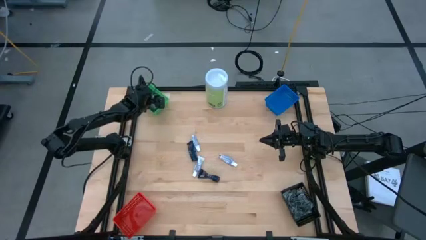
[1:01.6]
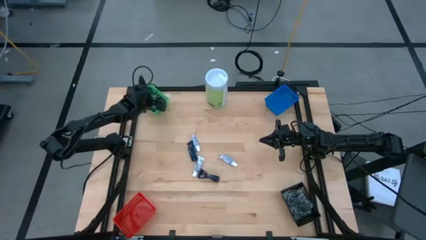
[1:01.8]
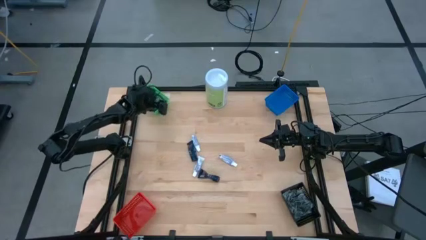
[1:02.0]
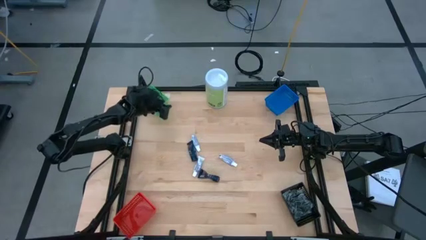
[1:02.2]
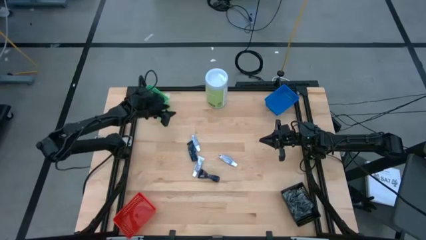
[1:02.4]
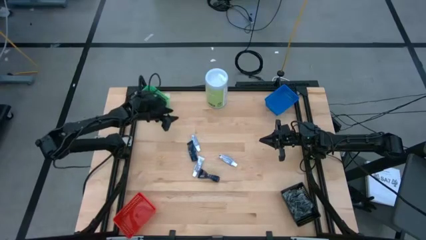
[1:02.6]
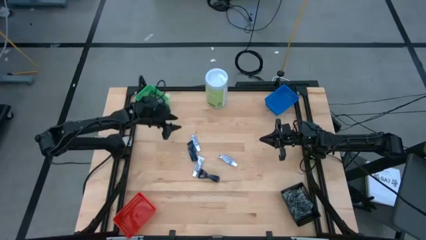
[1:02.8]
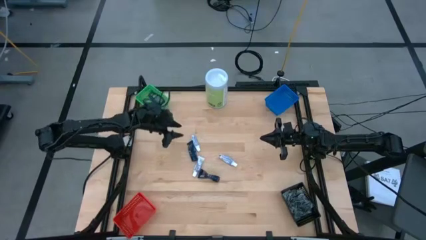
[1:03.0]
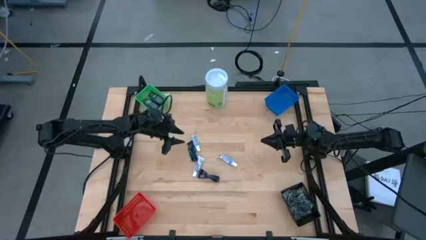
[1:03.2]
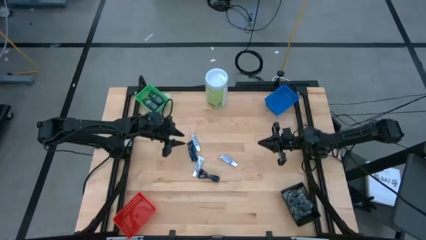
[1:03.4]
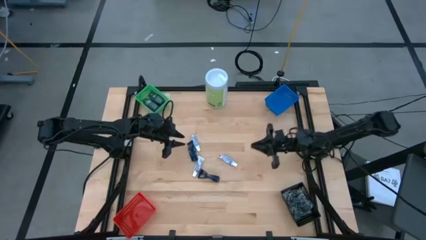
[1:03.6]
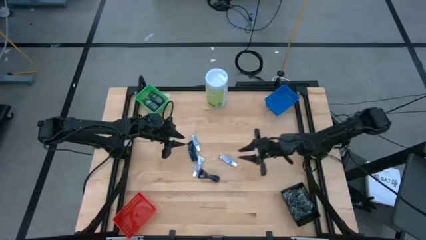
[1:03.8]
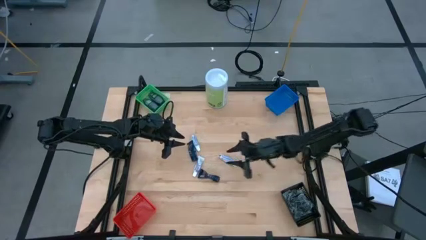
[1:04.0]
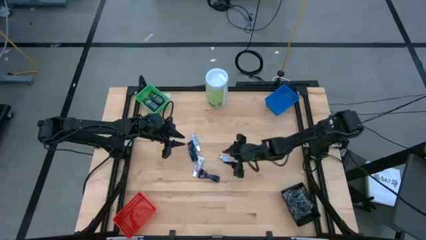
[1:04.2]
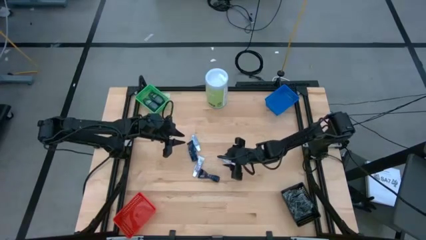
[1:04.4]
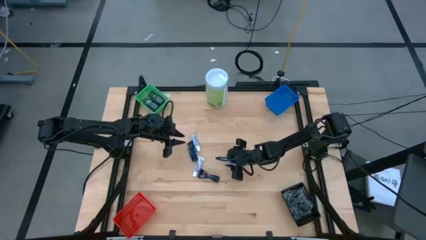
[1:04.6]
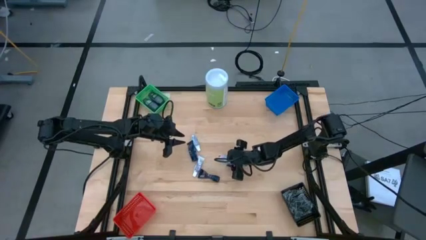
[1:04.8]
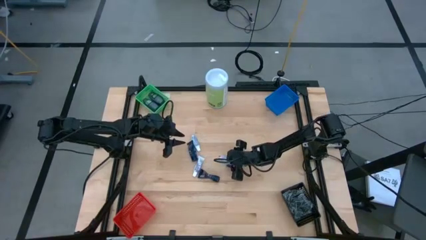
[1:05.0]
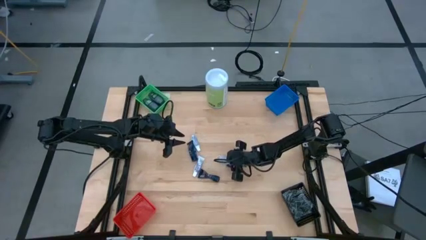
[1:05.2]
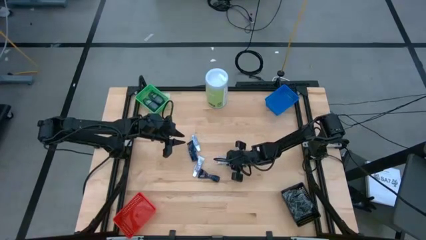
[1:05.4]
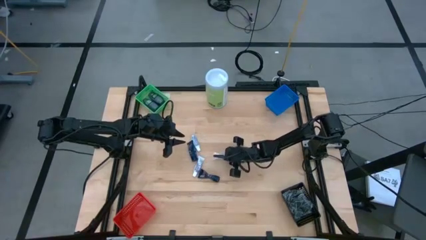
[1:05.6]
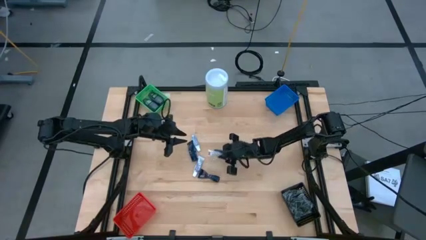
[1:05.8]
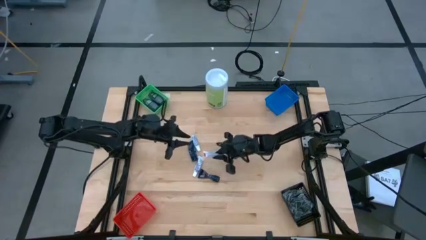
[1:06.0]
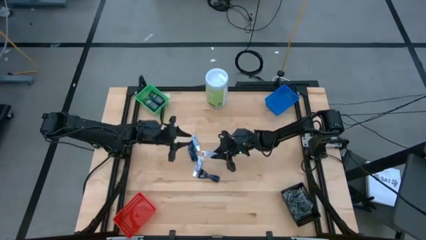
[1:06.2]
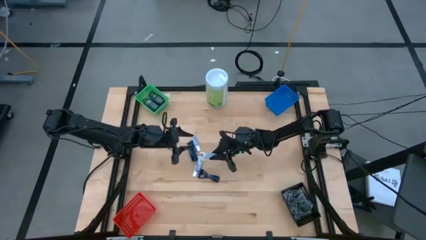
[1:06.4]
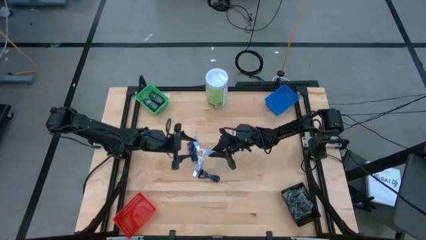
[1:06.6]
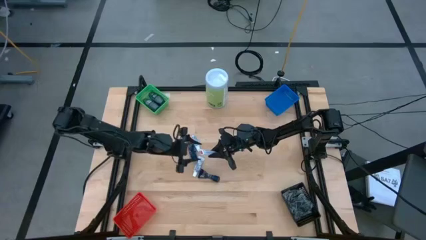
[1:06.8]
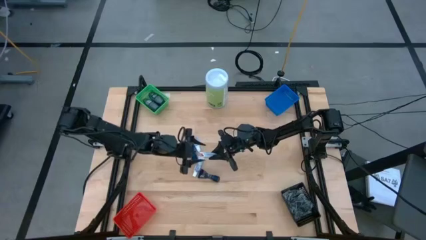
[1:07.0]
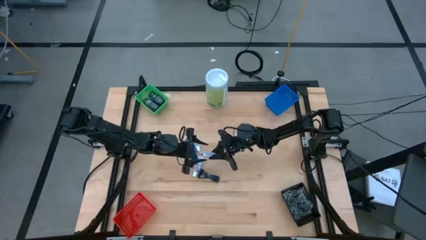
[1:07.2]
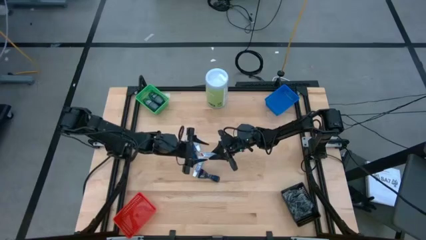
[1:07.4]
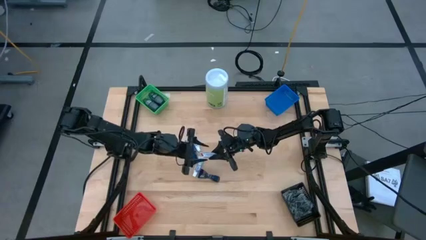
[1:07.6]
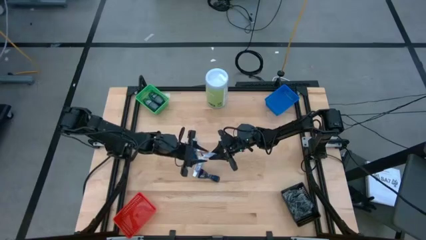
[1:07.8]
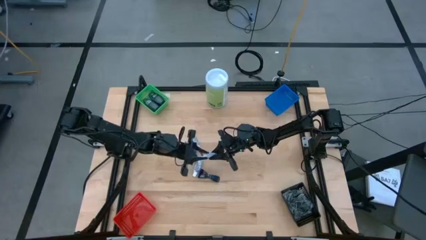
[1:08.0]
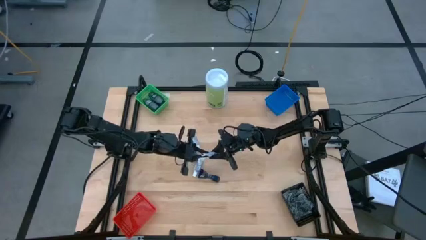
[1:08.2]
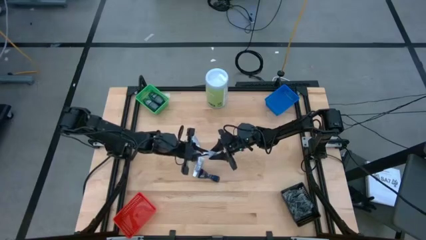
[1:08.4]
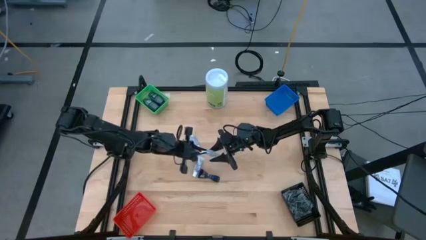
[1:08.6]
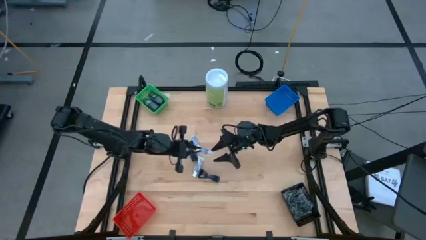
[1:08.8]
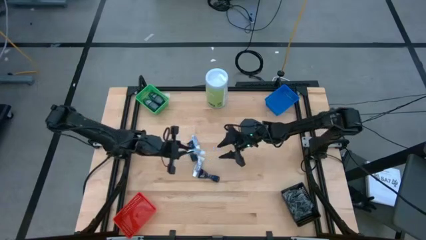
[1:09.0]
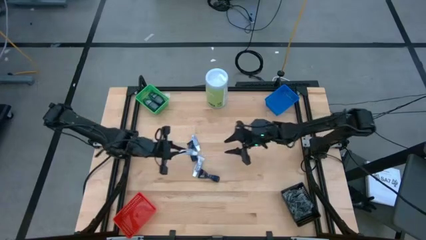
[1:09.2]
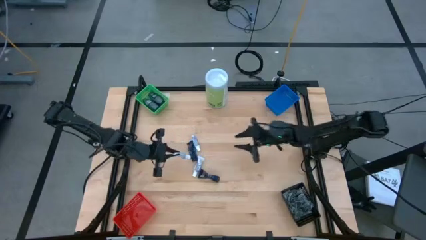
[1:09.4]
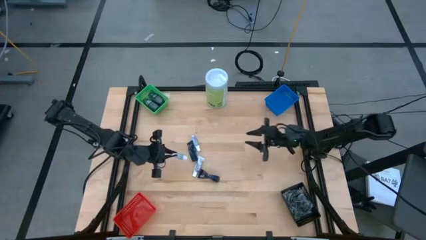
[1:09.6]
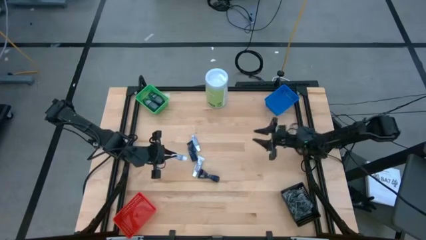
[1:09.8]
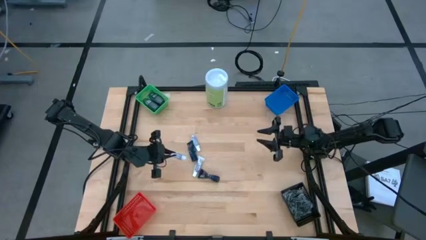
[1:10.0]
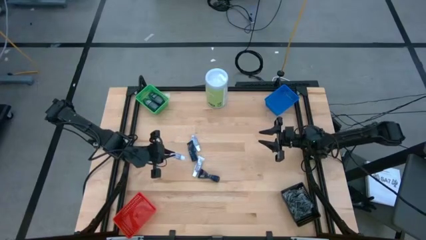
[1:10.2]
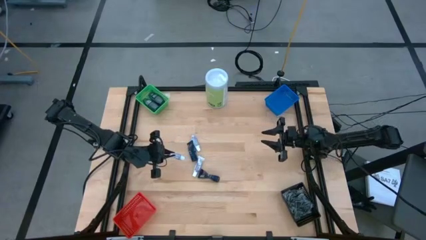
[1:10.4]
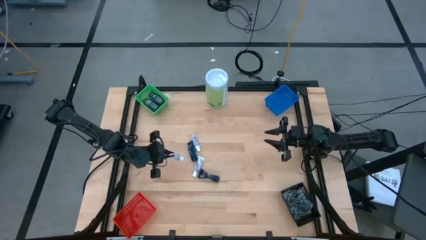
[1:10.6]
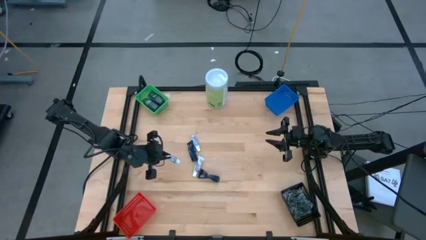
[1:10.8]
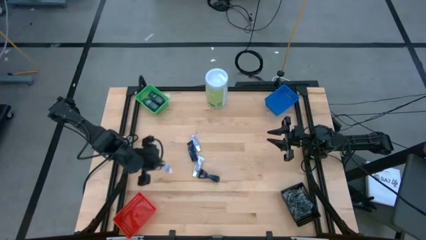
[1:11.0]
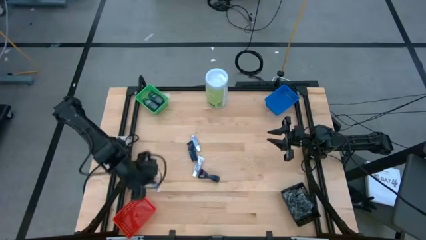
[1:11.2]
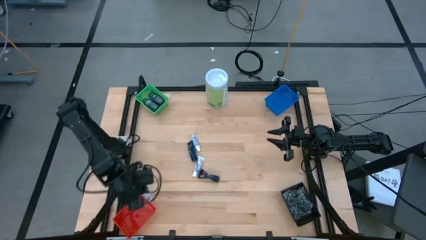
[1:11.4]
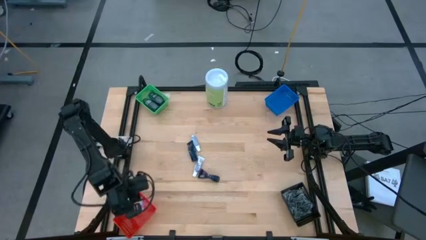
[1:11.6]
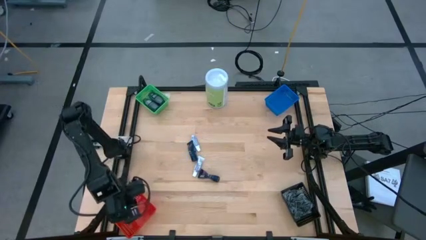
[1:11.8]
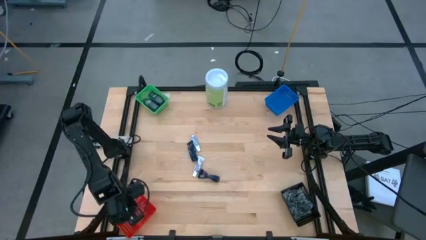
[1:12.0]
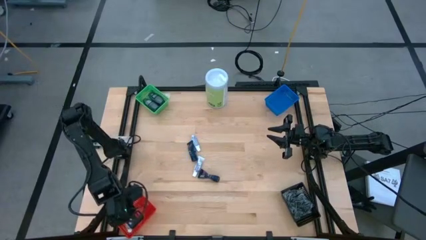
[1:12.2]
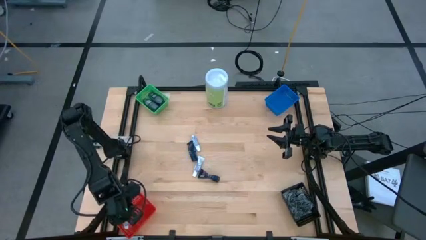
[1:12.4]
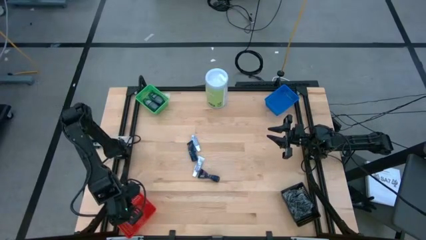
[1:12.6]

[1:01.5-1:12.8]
Task: Pick & Place Travel size toiletries
Put the right white toothpaste into the red bin

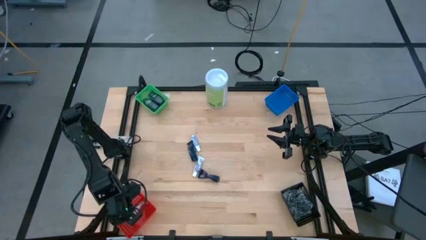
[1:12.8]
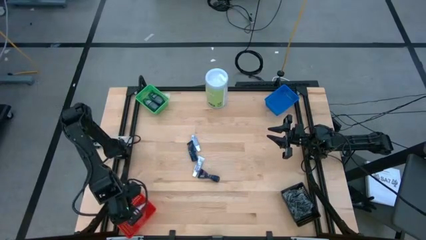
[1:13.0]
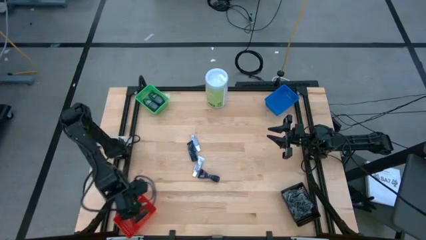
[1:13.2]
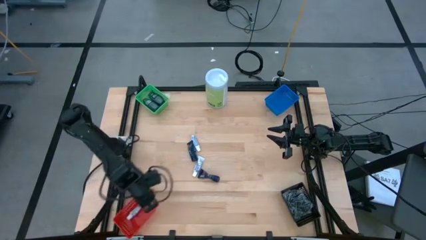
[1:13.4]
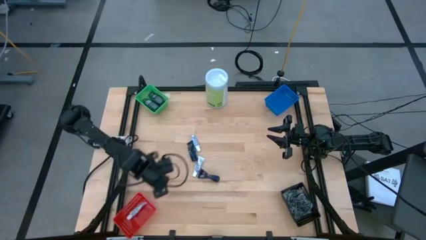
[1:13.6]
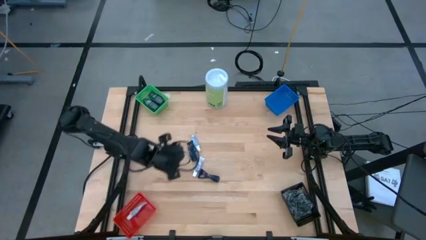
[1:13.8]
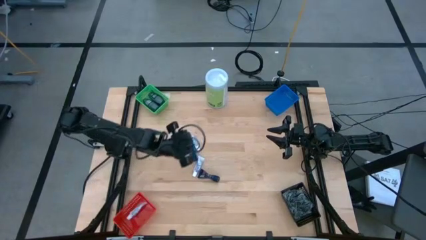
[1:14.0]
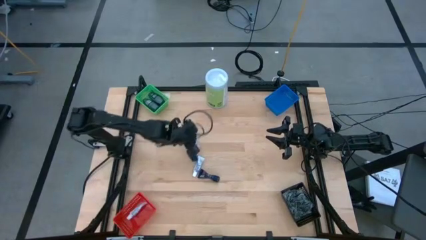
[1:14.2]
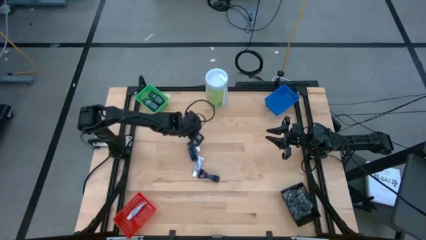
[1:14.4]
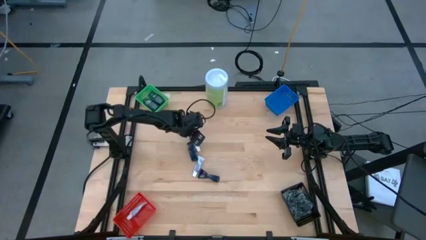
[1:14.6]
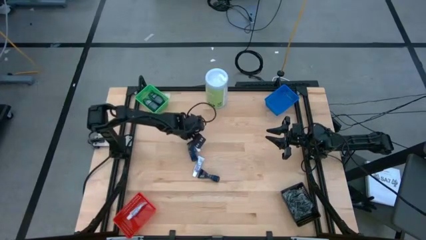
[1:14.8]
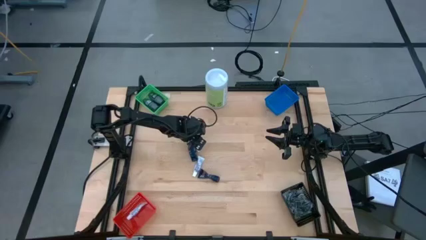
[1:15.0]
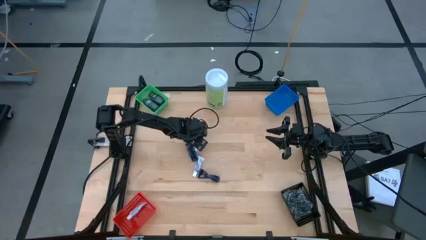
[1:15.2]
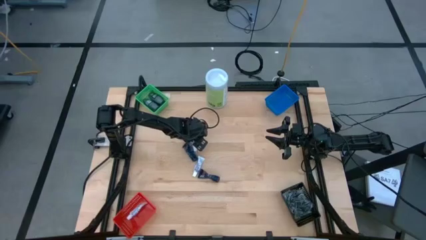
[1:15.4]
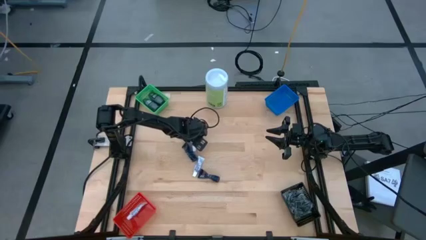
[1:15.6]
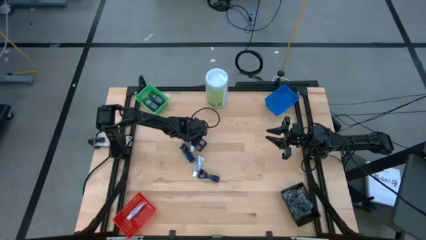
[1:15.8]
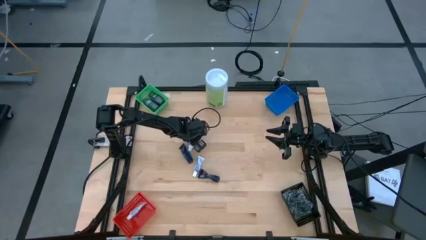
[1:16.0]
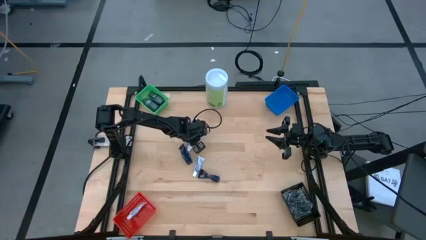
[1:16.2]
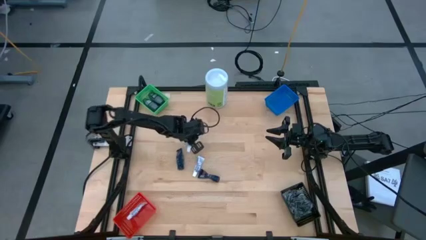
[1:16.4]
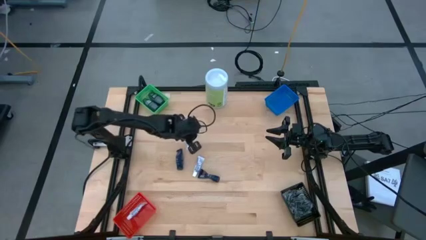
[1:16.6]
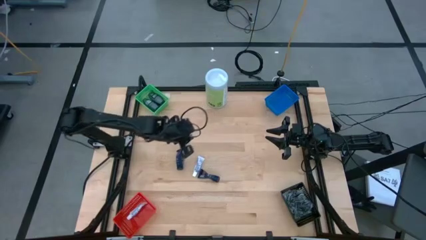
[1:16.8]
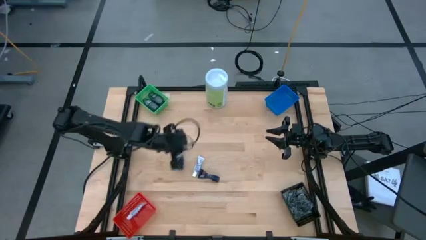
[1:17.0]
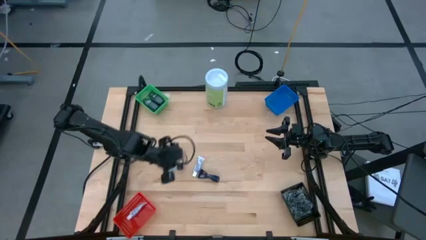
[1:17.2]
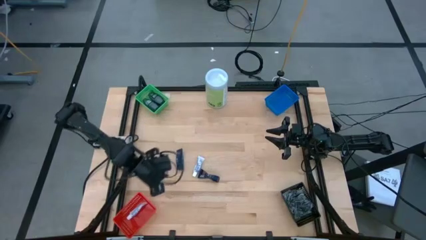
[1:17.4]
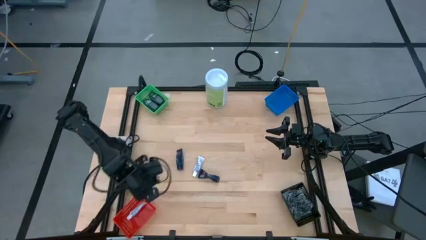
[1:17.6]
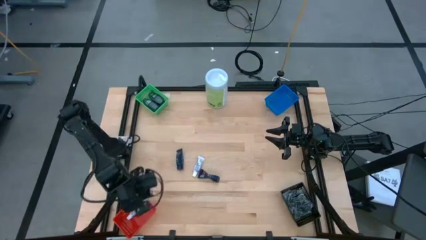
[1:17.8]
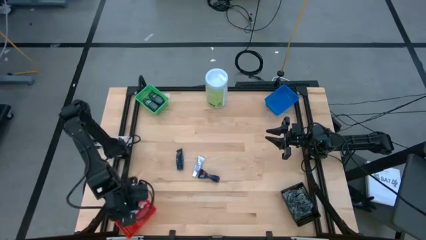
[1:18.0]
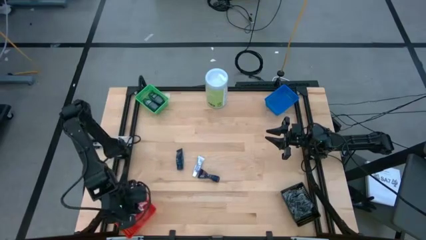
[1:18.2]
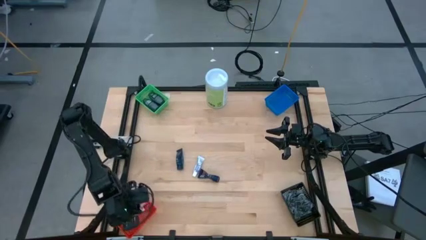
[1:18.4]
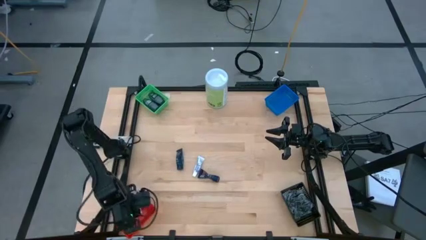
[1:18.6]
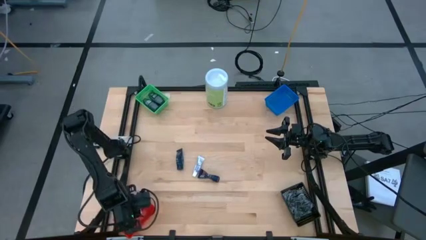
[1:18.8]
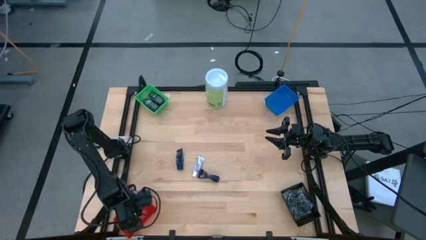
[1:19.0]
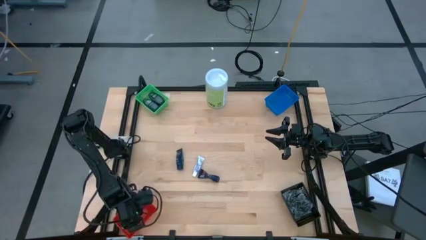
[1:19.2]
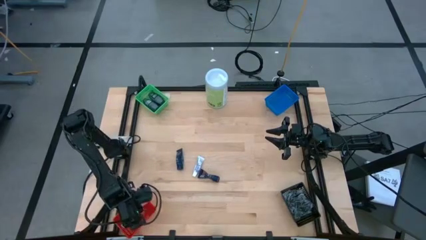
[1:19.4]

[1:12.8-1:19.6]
Put the top white toothpaste into the red bin
